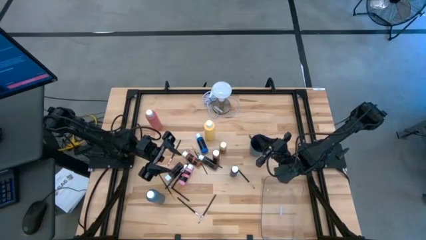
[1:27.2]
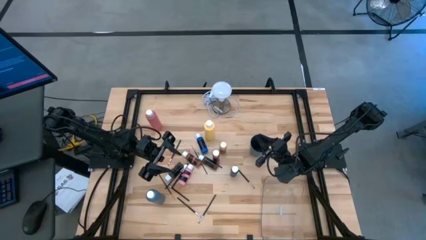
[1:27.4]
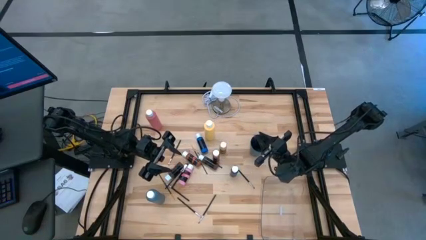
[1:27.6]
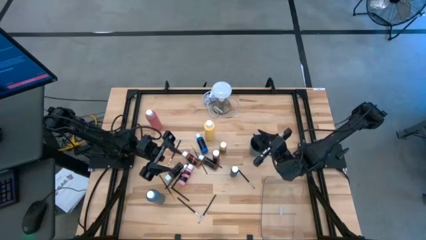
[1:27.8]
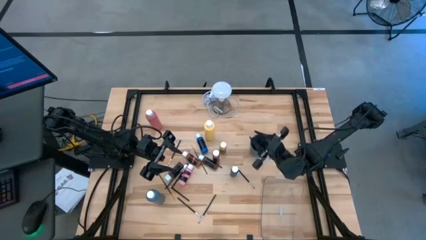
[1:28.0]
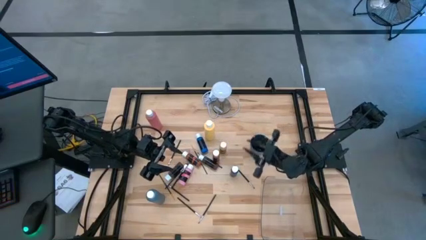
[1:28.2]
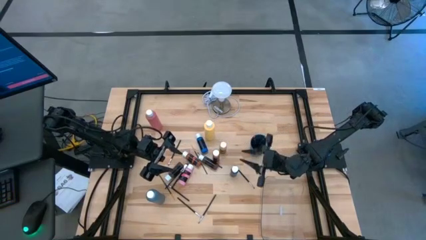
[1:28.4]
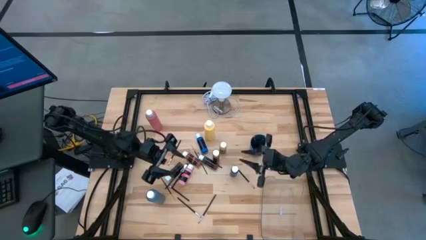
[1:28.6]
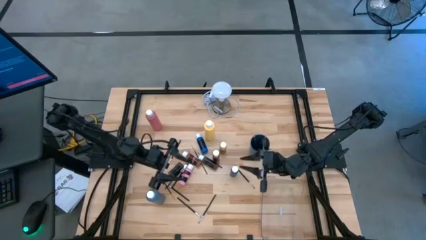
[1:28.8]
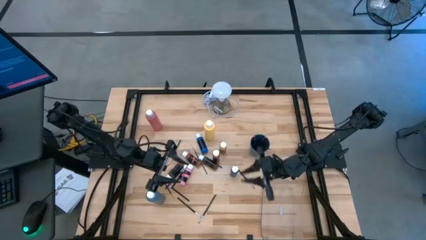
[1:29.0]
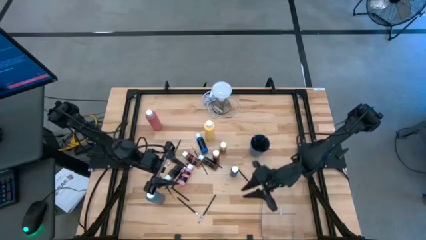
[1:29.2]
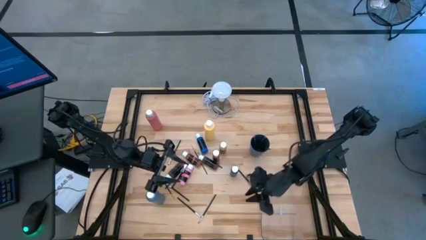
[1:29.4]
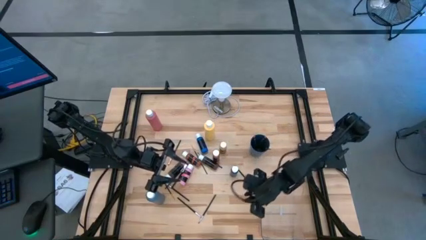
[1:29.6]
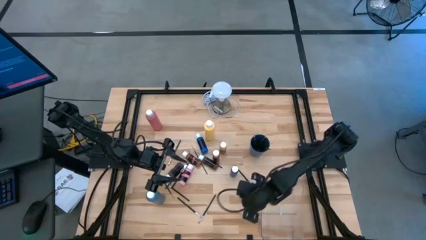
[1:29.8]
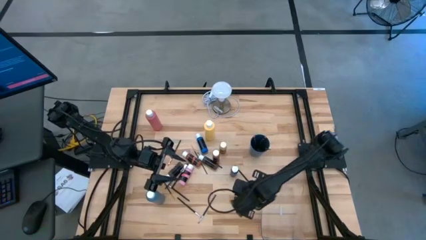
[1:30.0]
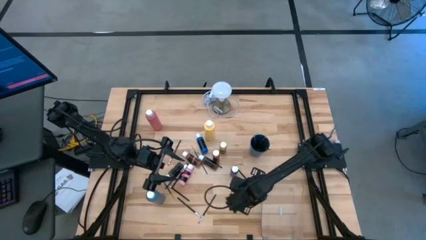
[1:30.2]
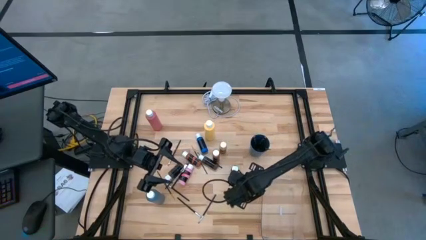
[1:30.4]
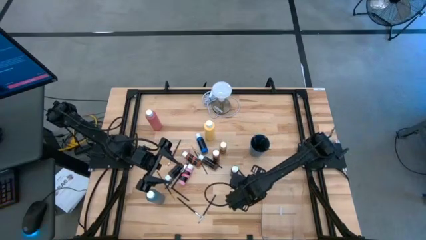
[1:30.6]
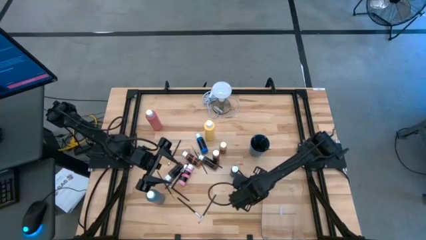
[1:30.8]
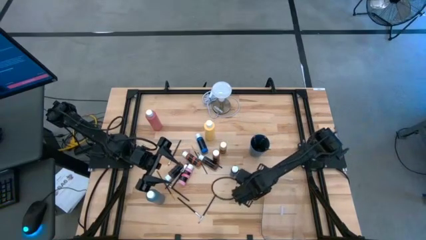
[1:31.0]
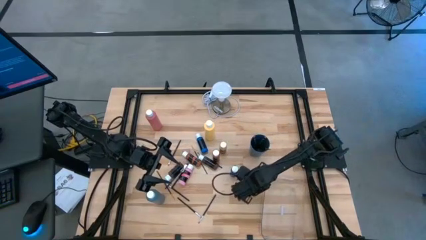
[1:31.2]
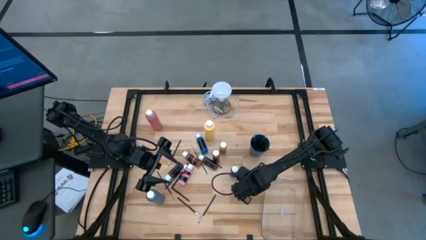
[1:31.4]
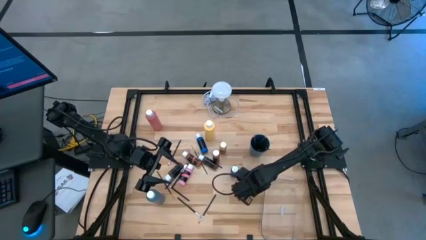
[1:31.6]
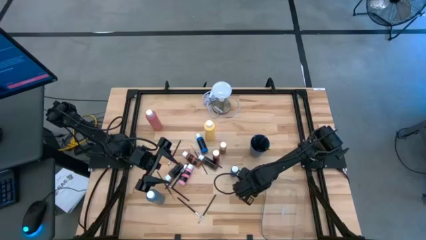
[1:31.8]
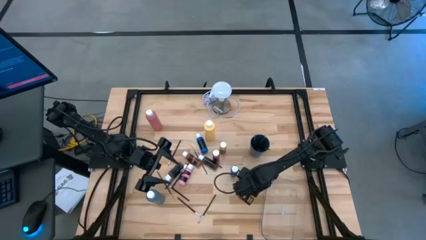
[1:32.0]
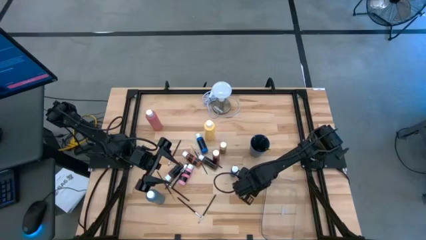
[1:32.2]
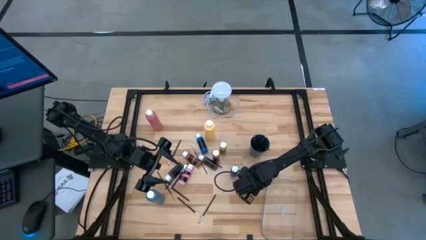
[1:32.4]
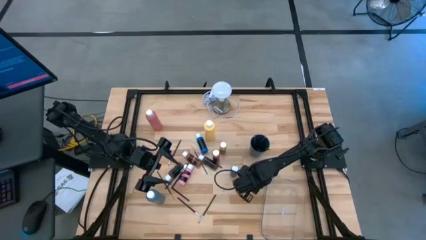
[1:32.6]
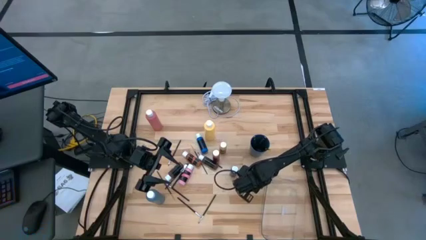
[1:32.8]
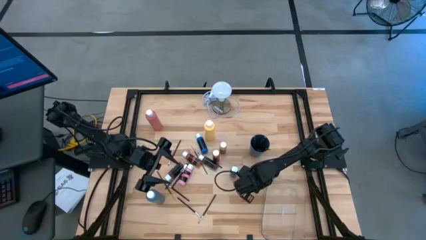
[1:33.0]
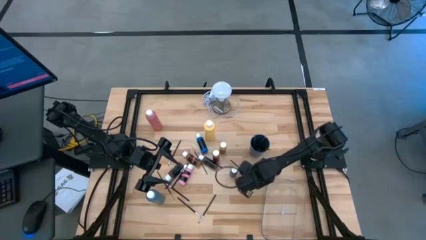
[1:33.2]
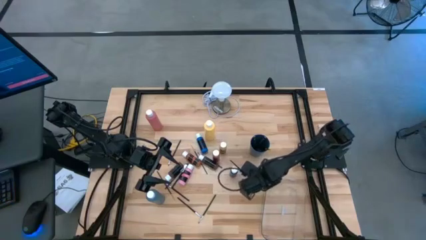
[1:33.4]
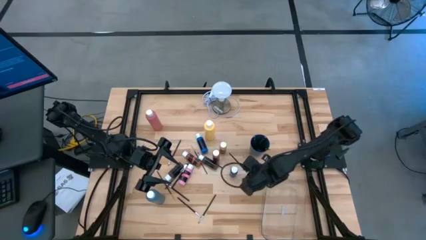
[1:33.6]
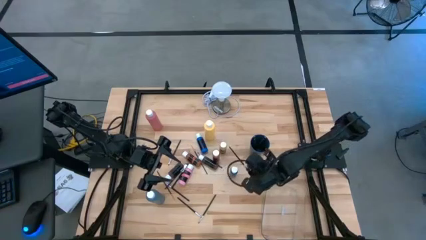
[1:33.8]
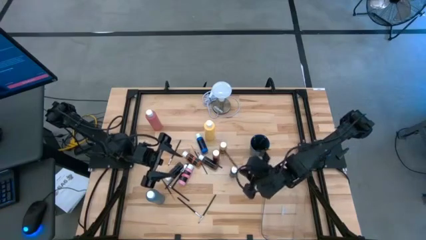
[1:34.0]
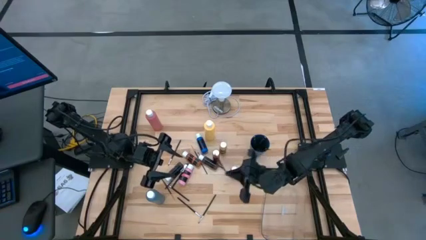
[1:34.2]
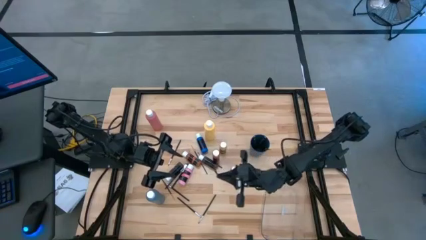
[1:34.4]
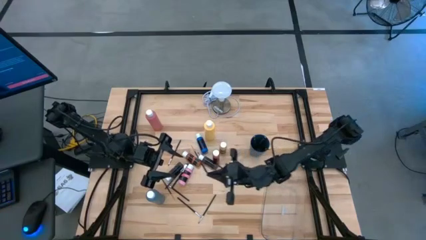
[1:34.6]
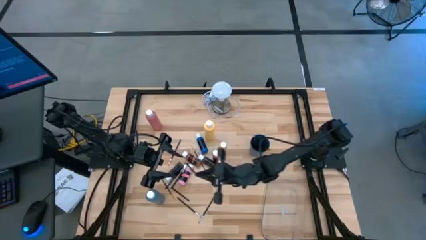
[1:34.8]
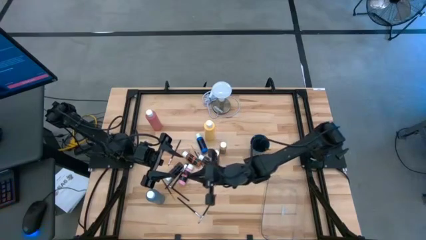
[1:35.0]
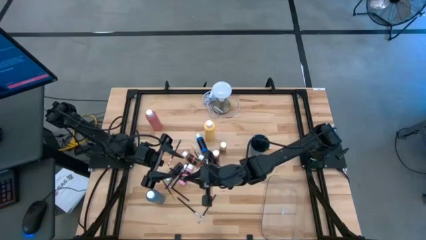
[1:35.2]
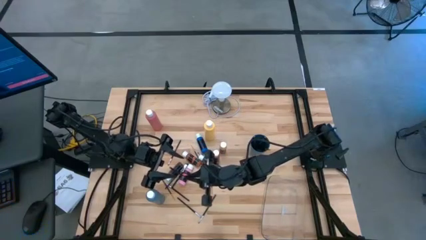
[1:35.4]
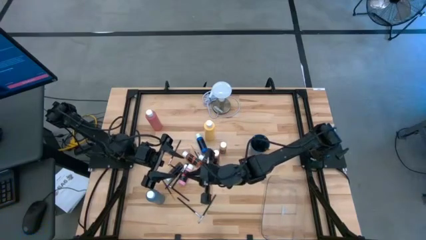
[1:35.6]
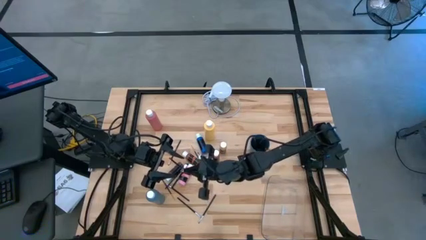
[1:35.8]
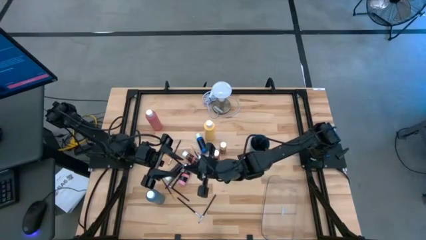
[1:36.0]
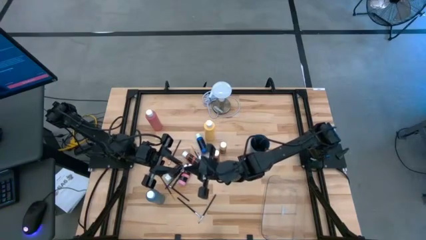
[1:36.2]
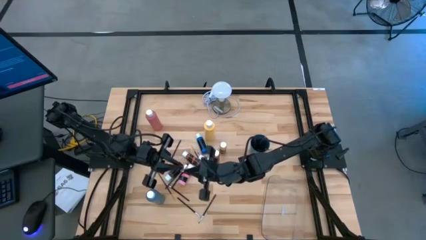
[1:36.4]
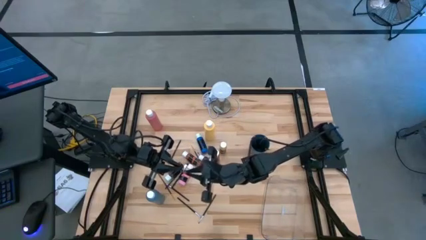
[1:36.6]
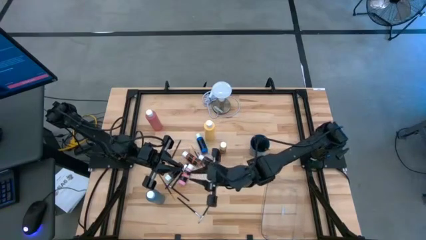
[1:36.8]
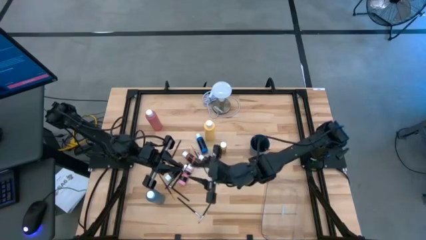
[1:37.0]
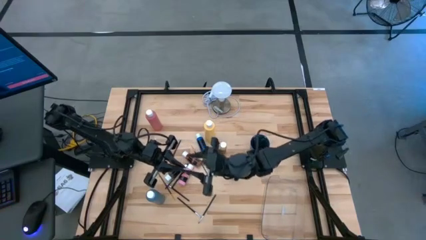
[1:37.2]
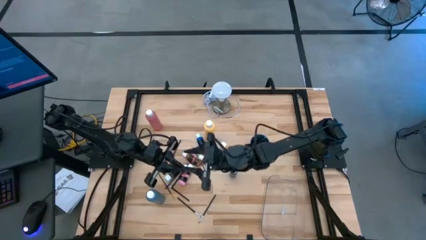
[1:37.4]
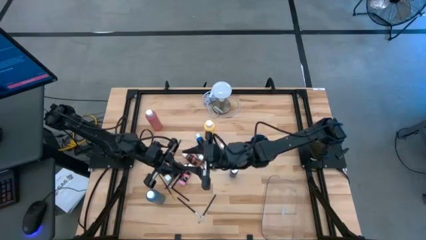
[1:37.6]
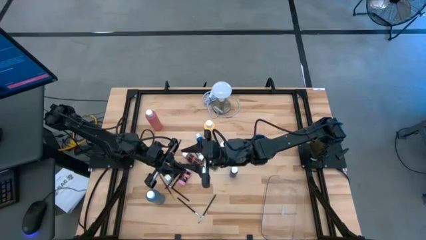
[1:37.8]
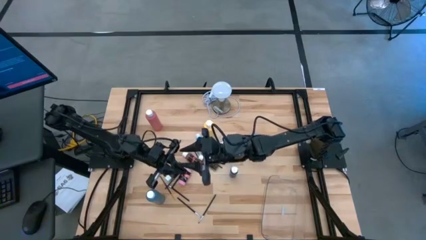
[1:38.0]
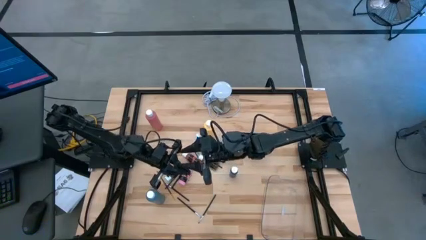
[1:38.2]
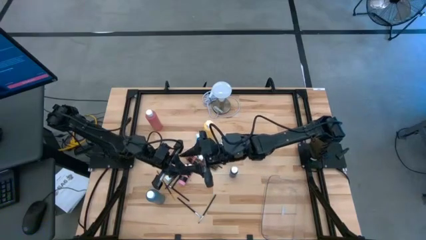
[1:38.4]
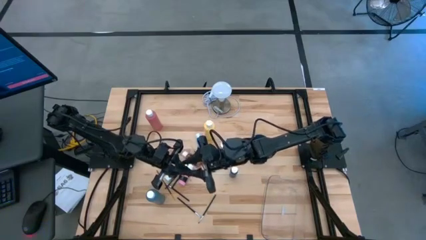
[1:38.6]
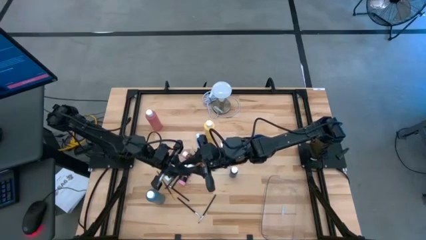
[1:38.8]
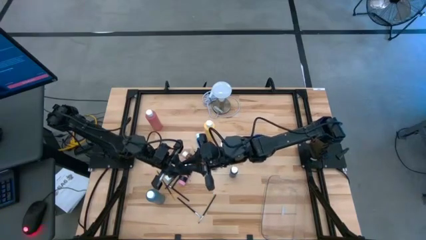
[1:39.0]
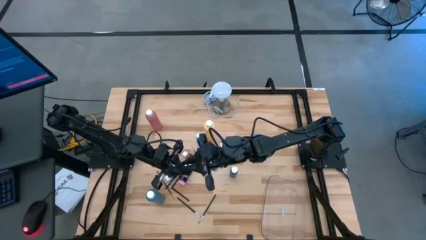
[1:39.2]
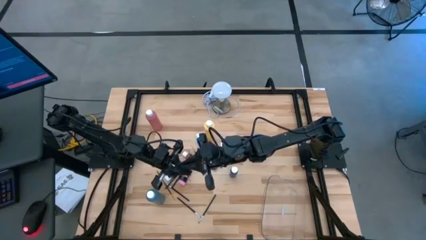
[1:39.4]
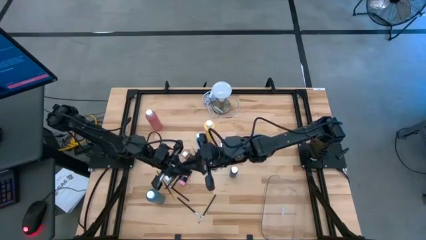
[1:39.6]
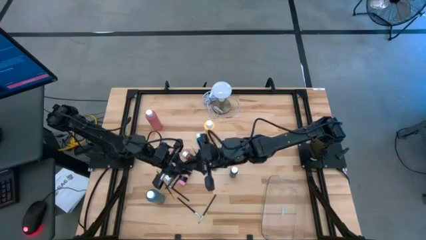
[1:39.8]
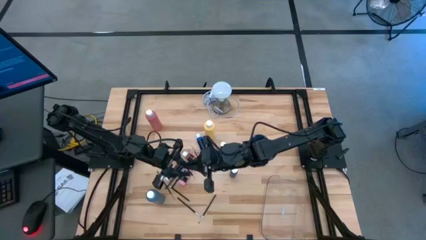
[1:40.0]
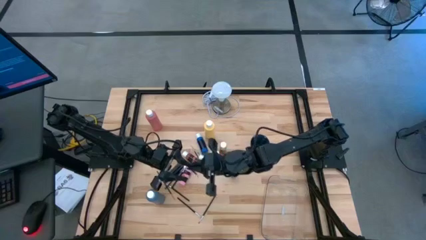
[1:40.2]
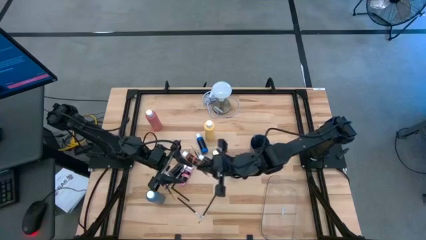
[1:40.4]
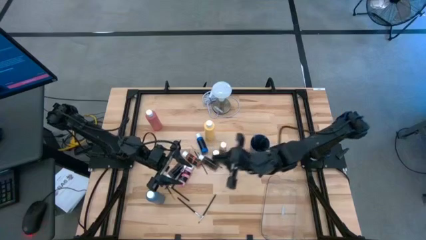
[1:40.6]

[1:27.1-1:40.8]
Task: Pick & Place Paint Supplies
Put the black silver paintbrush into the blue cup
